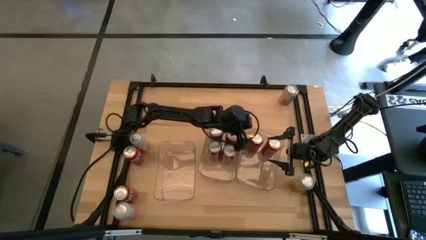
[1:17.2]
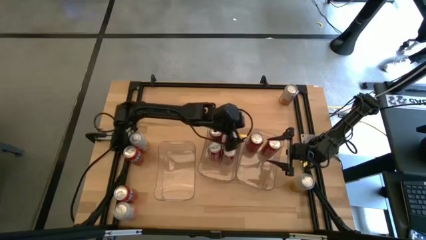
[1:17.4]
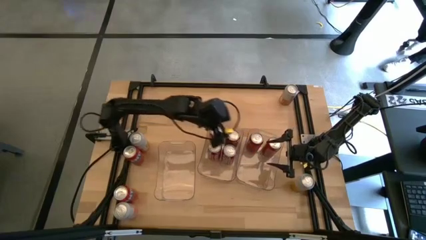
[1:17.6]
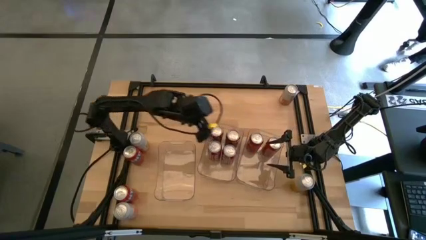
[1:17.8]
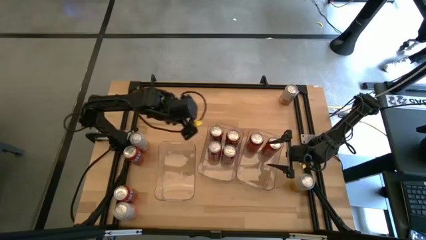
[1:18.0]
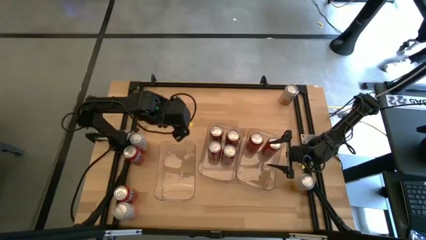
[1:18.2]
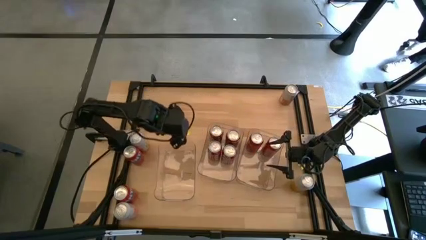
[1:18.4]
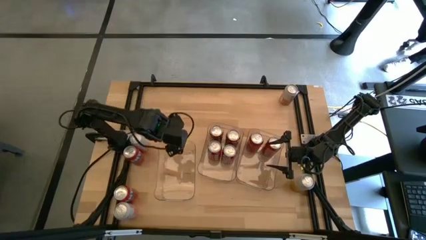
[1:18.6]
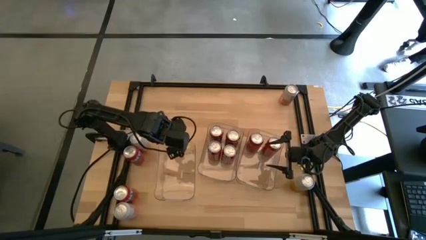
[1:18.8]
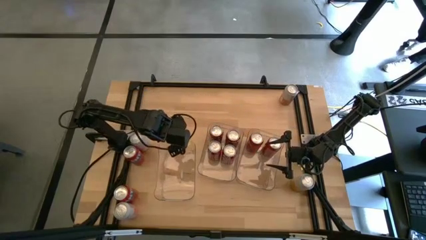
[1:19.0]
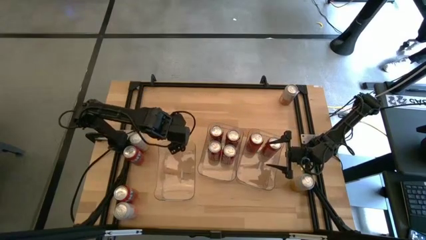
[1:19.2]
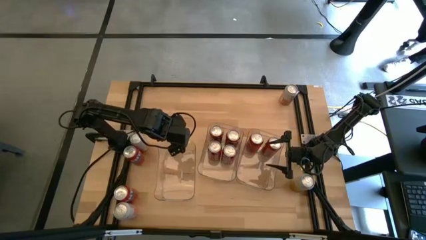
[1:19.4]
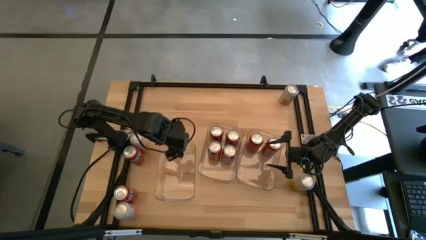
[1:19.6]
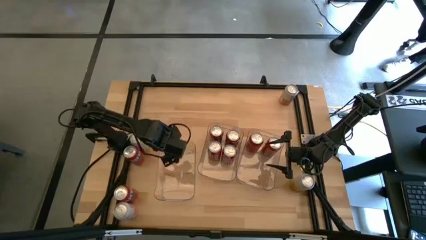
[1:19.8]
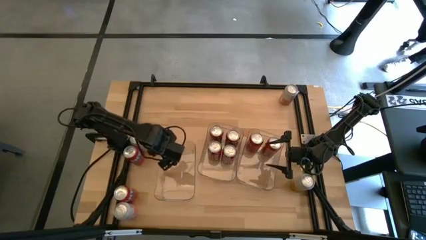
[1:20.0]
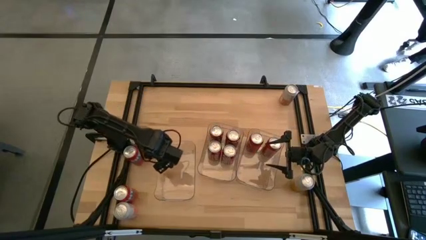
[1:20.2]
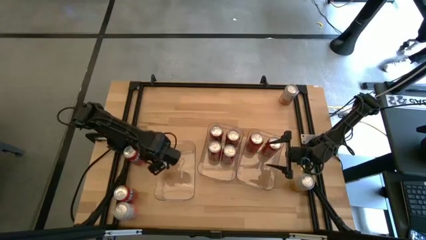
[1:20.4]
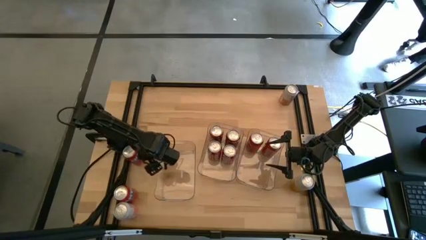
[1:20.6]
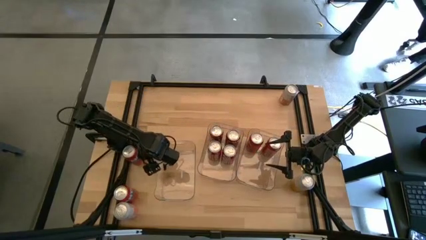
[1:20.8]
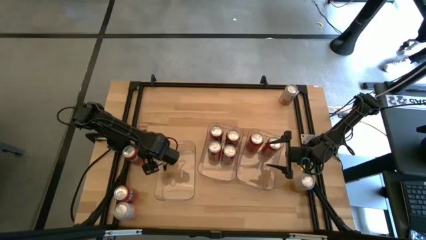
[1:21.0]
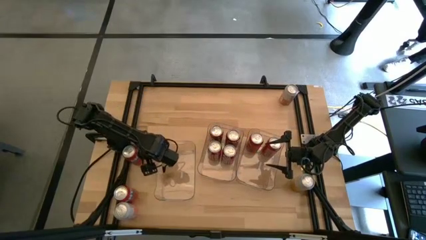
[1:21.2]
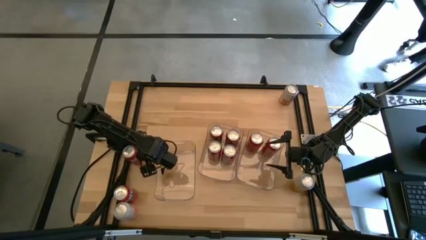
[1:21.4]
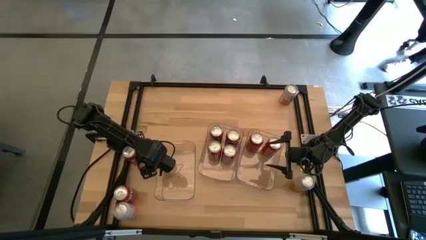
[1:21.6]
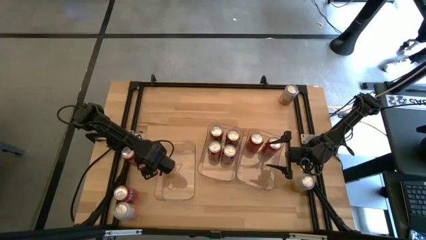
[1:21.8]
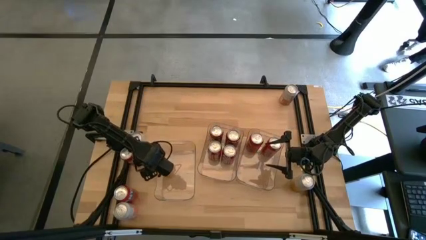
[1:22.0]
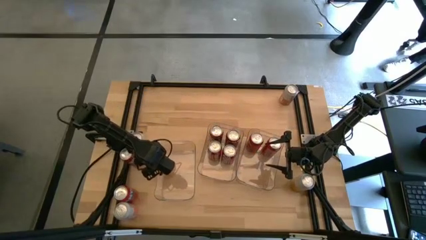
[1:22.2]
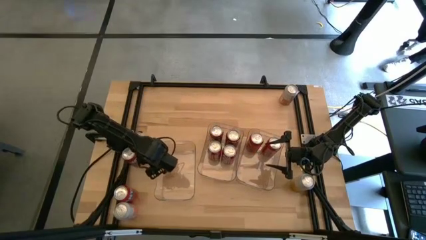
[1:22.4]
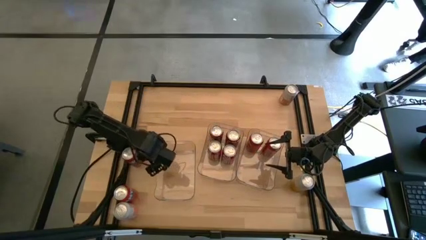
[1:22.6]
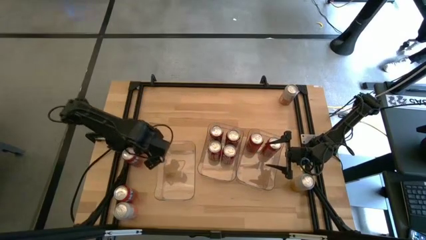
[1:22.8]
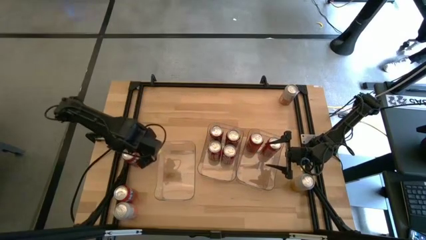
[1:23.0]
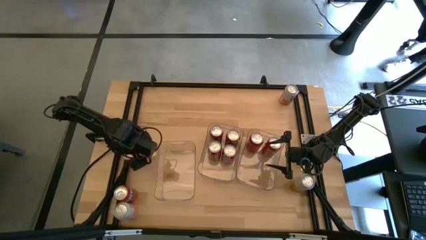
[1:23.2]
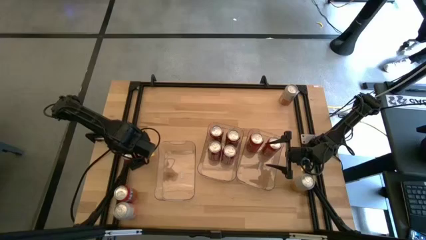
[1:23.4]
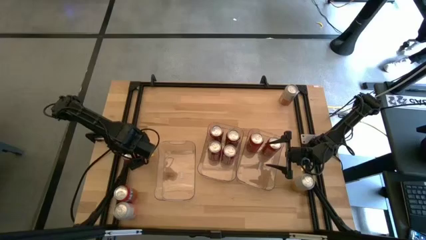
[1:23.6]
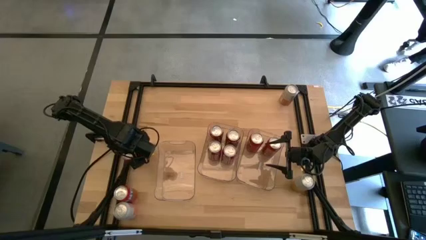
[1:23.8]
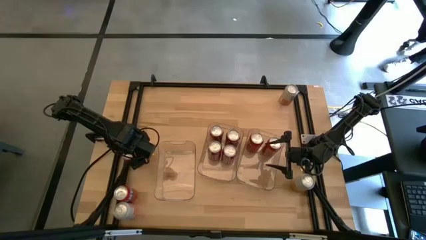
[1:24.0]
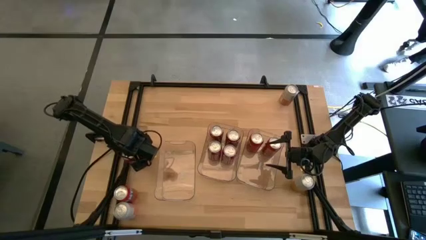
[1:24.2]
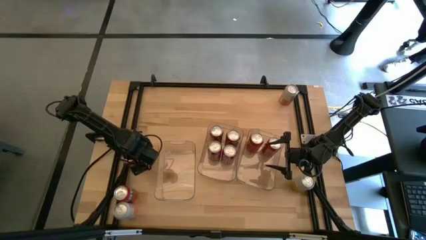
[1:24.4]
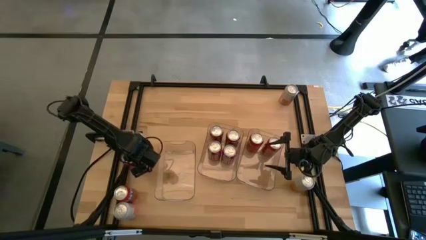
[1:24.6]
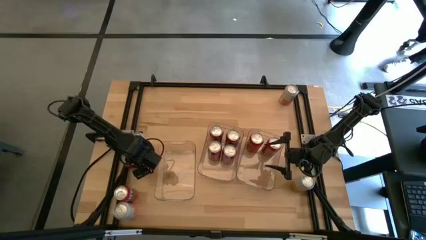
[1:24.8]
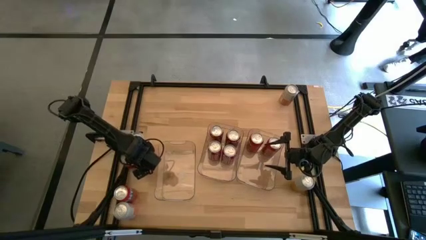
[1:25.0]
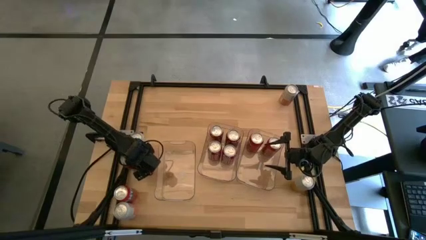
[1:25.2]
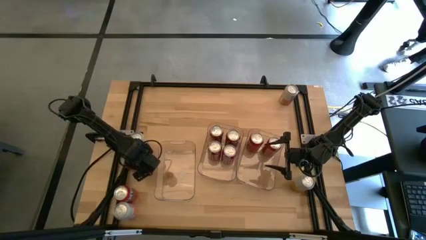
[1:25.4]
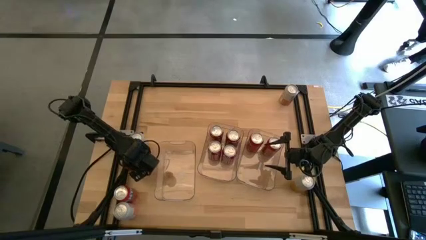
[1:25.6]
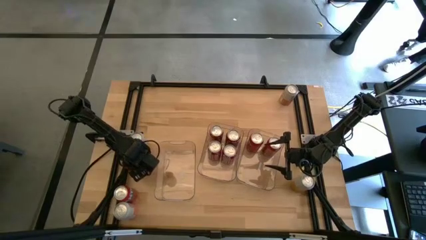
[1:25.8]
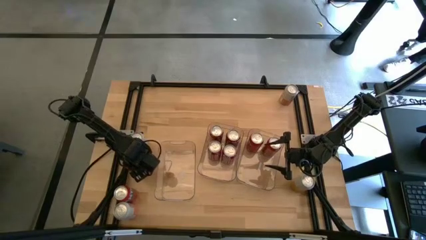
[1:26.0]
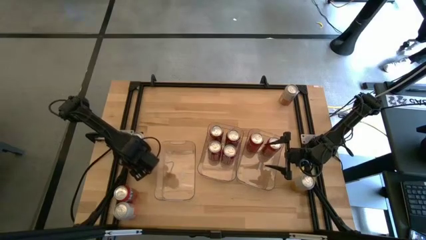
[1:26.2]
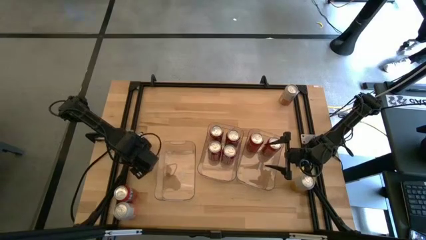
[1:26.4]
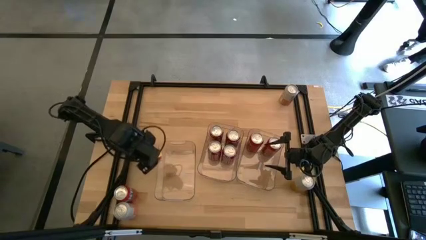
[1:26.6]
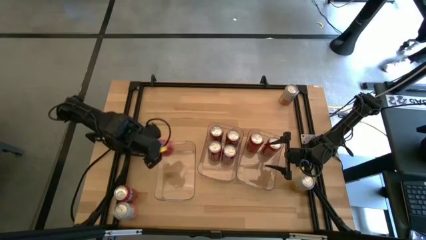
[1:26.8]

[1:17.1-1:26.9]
Task: Sort soda cans
Put the top red soda can into the right transparent bin

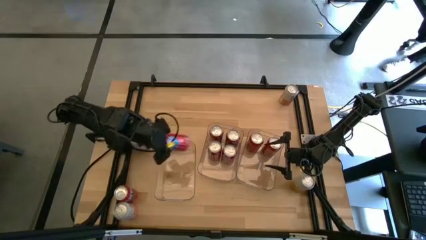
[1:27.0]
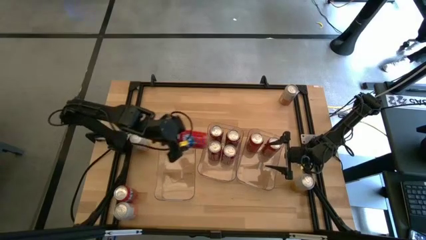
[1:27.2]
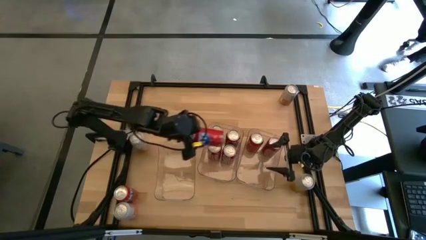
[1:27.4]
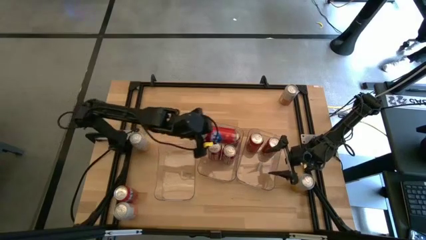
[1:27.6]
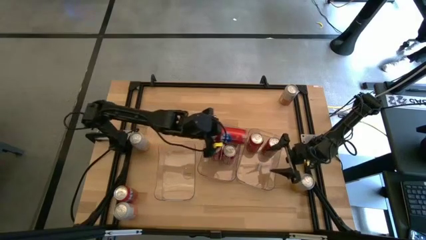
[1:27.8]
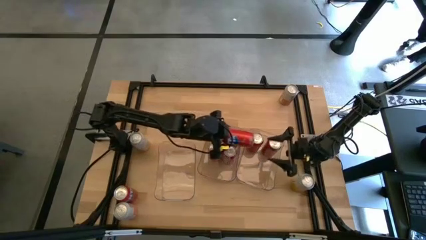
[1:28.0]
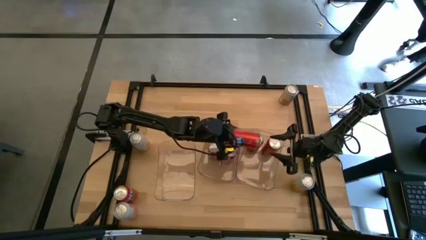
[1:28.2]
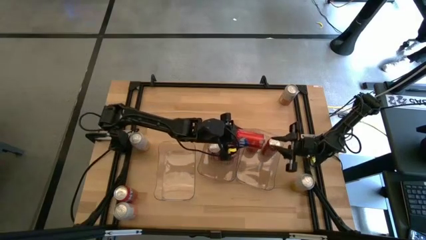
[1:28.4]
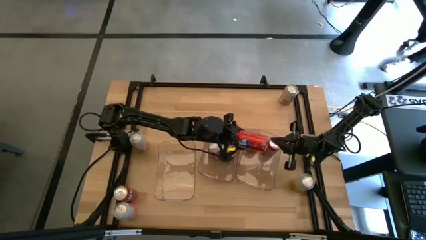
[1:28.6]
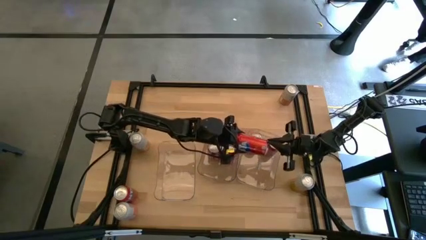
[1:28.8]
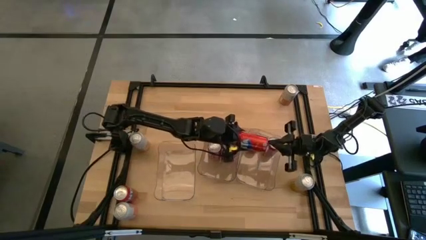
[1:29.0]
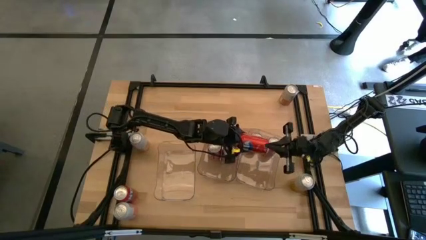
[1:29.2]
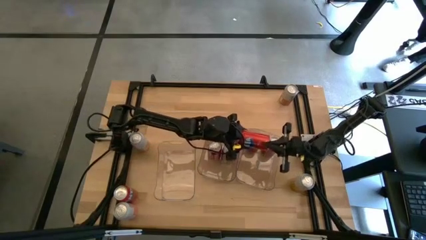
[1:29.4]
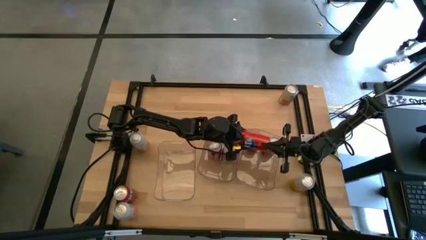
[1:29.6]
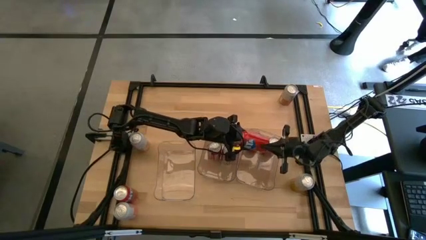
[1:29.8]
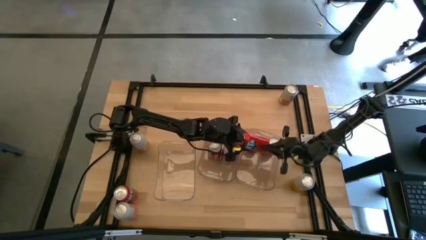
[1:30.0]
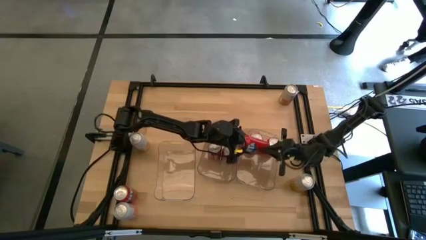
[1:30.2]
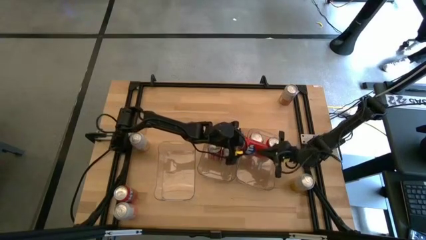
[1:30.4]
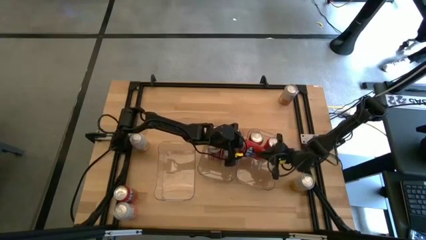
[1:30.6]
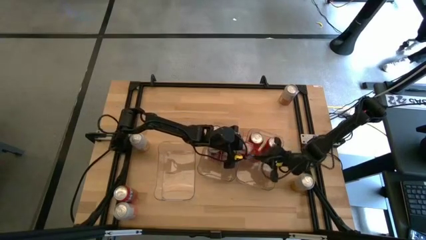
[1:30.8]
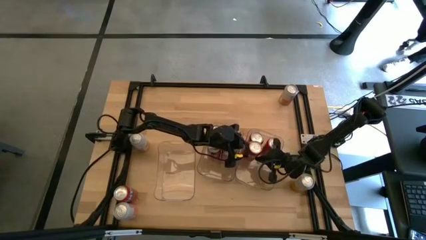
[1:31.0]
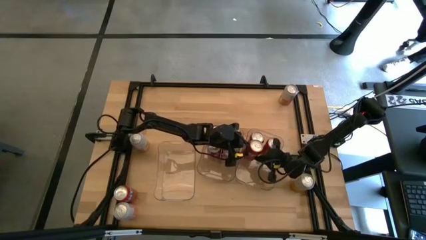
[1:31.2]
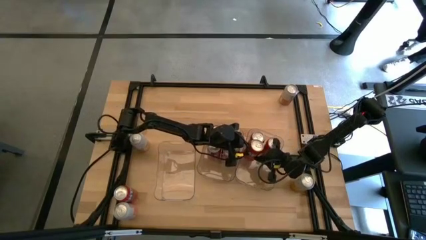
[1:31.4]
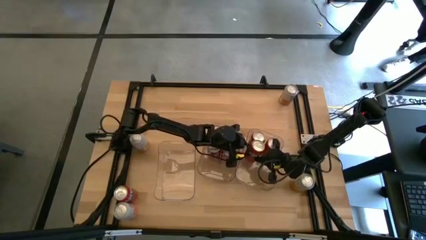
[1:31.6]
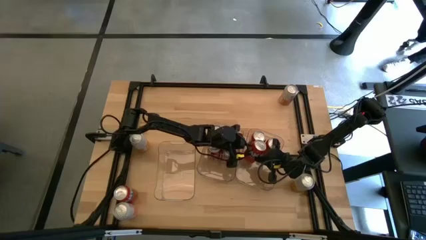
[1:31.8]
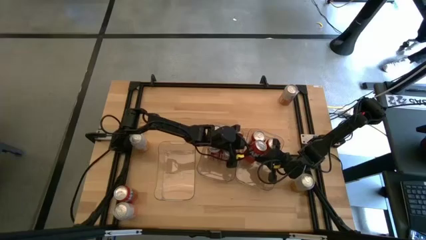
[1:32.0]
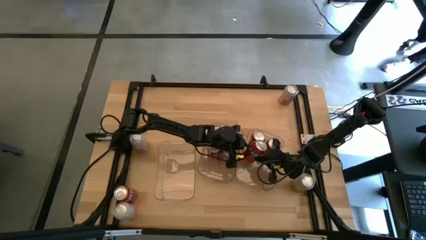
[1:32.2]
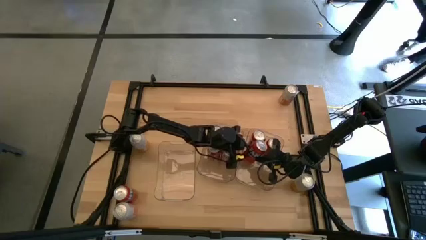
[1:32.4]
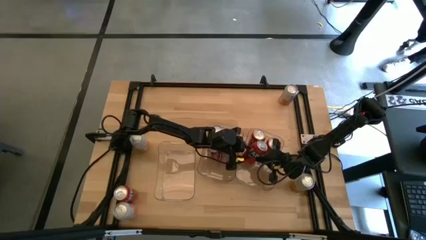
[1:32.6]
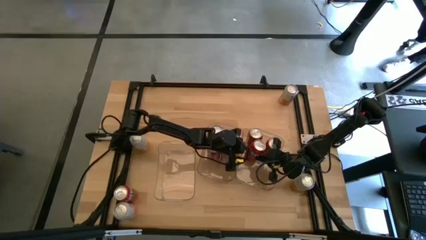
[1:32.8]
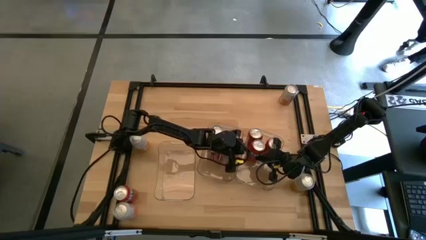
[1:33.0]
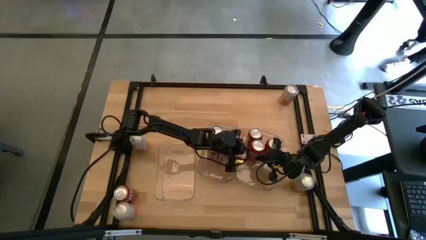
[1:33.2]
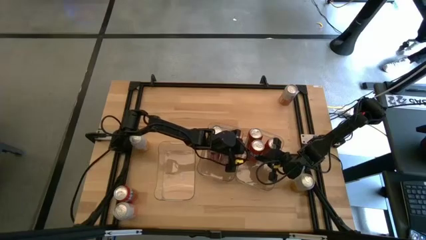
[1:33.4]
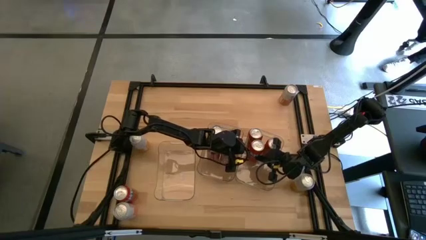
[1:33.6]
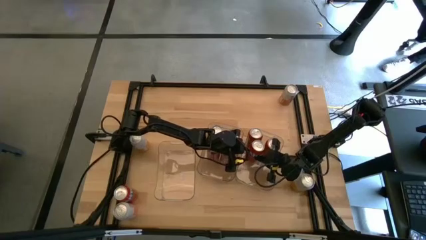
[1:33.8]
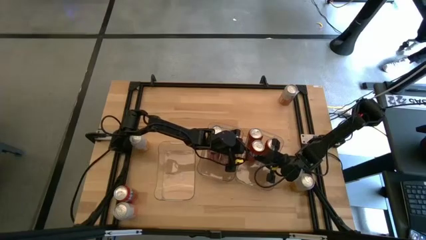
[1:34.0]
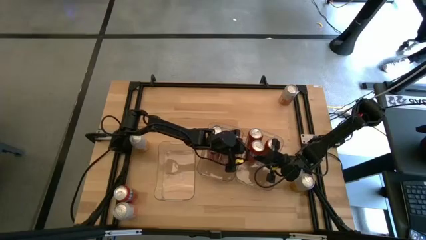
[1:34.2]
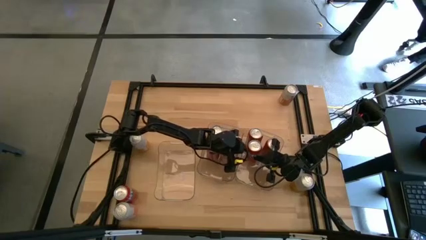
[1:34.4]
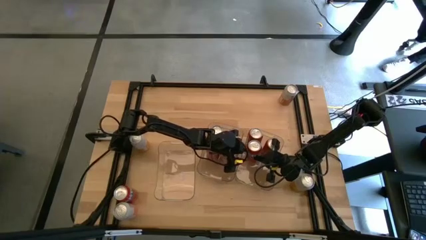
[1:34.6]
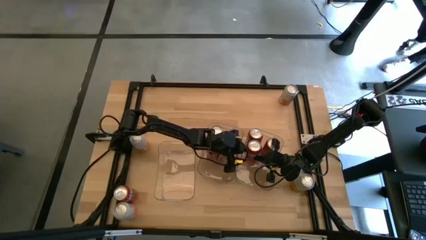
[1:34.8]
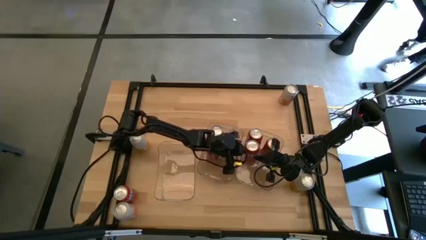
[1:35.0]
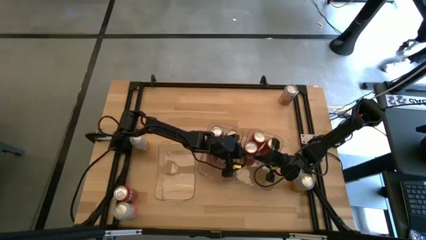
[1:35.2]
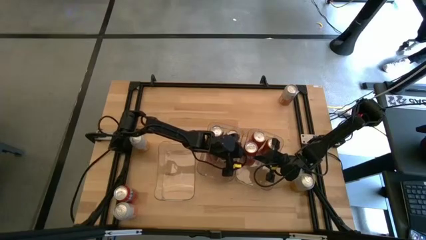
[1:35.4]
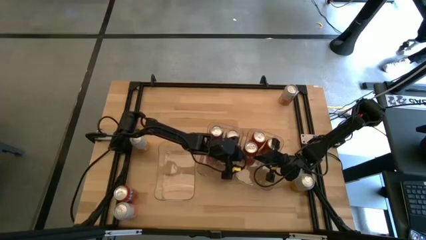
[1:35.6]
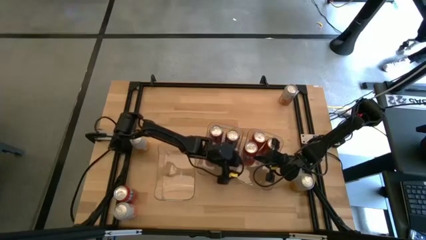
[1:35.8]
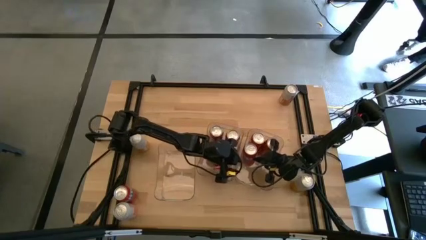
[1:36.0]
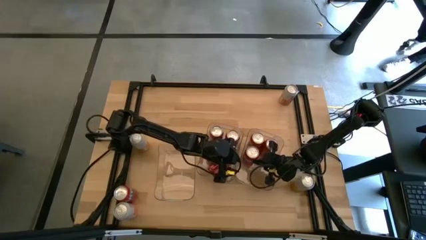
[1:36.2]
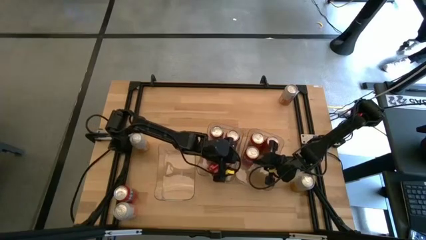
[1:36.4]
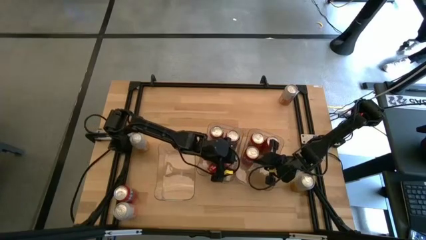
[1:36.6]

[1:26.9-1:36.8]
Put the top red soda can into the right transparent bin
